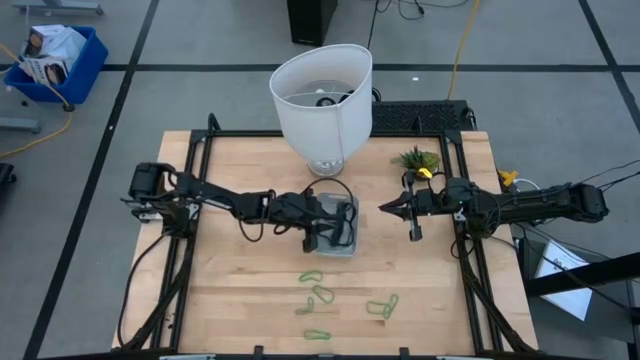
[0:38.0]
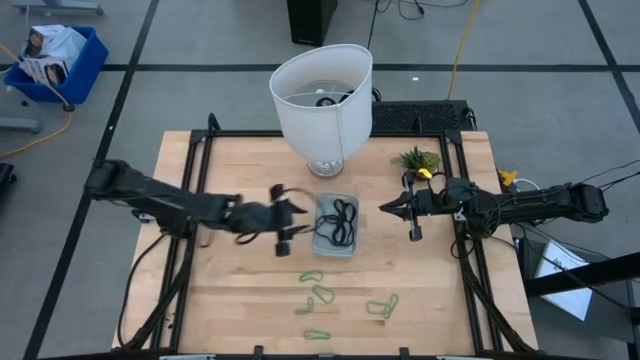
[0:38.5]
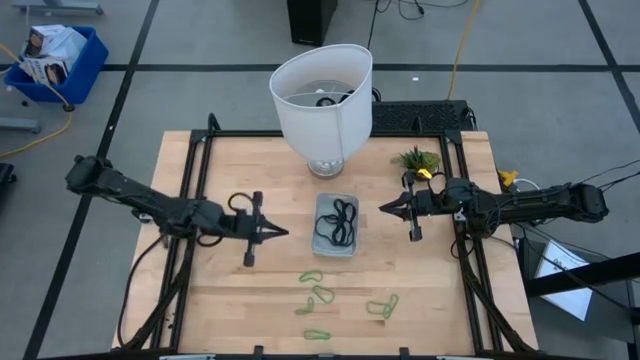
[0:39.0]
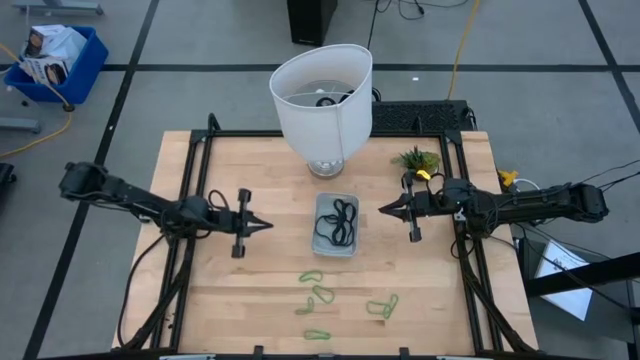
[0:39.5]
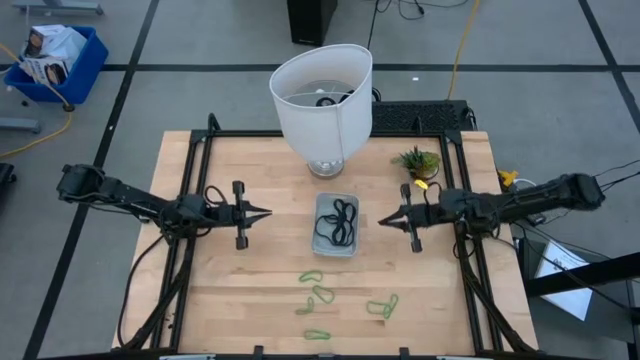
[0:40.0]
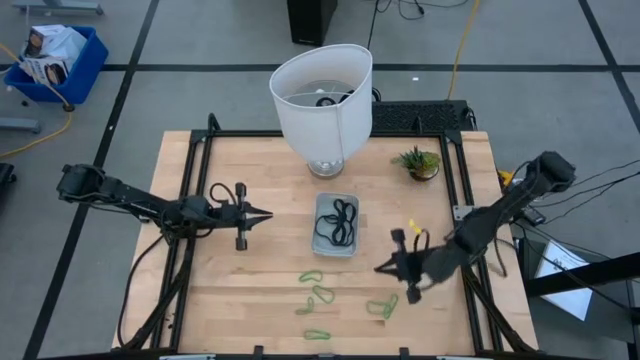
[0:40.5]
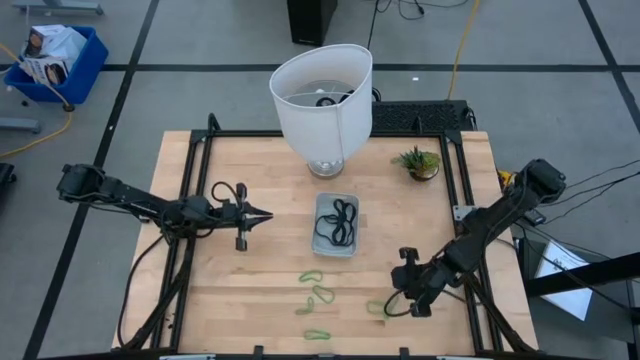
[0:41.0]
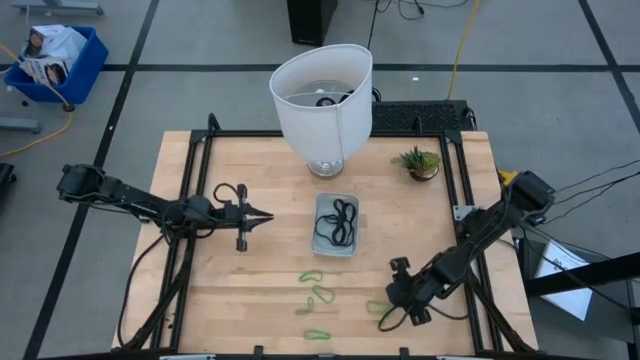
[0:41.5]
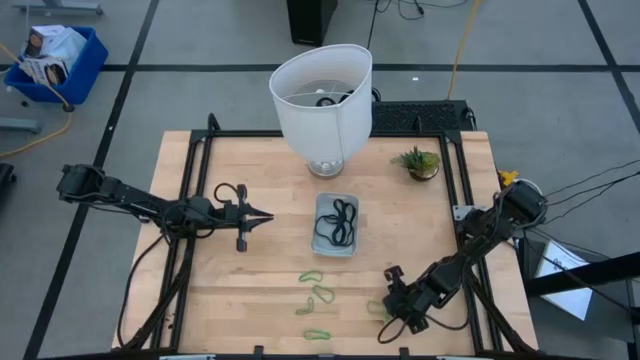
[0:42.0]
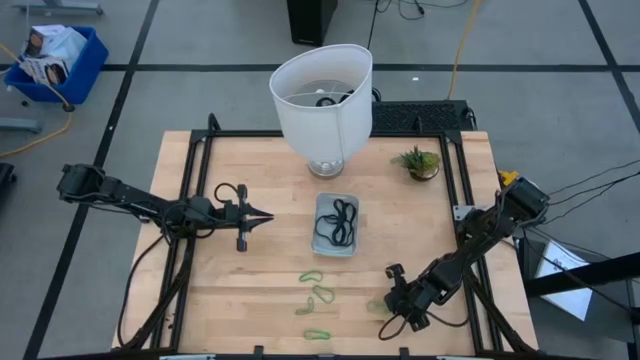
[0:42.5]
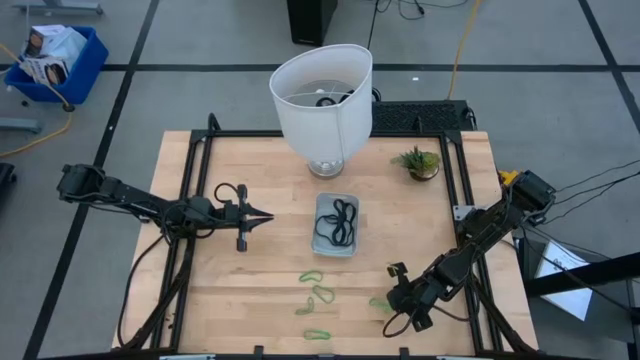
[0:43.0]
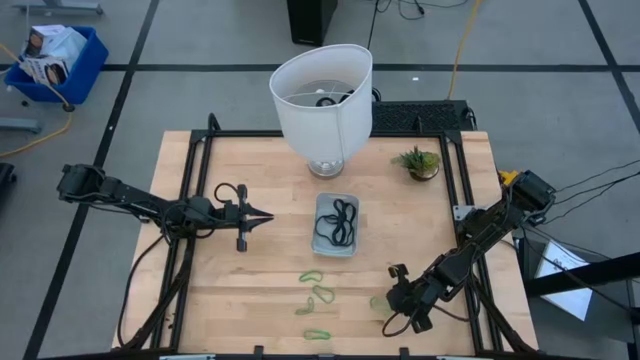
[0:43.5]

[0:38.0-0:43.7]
Task: Pick and place rubber bands into bin
Put the green rubber band into the gray bin

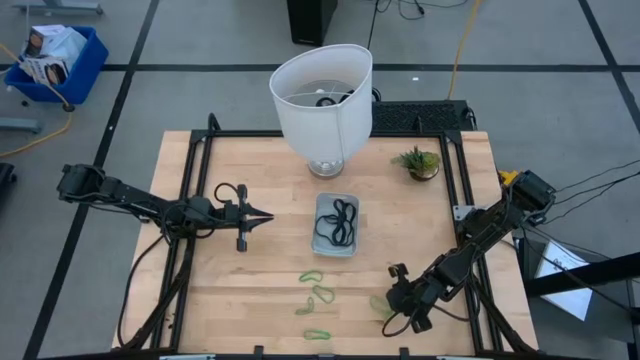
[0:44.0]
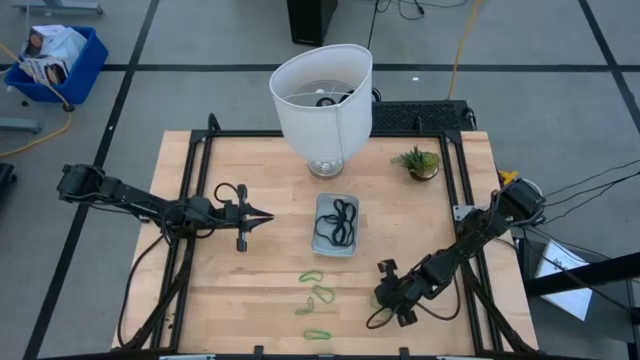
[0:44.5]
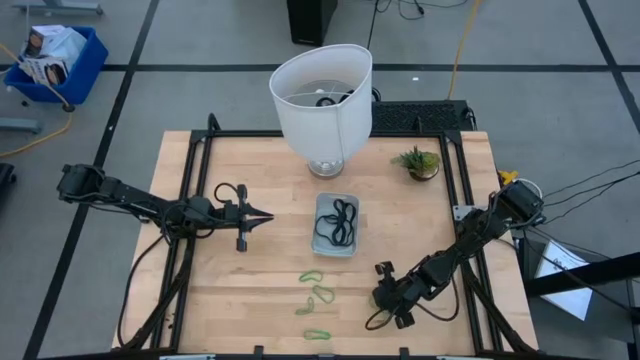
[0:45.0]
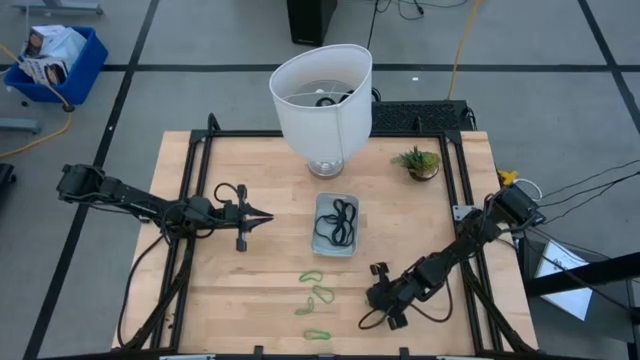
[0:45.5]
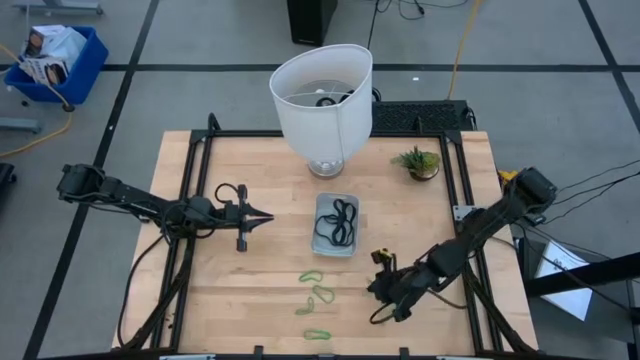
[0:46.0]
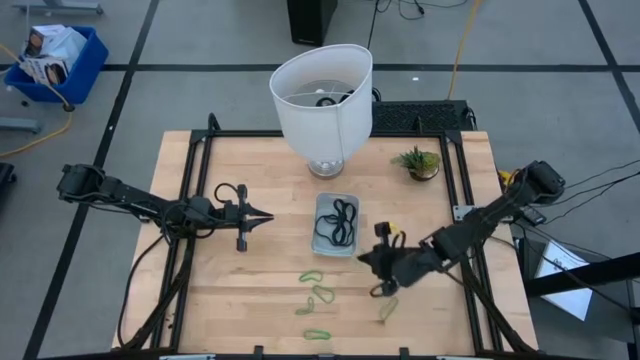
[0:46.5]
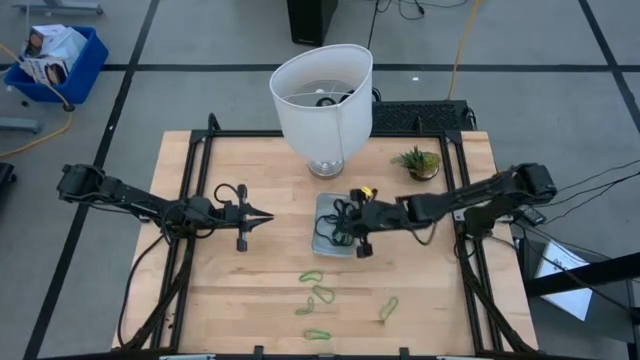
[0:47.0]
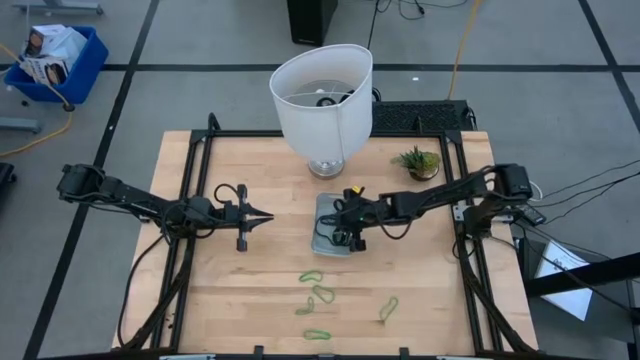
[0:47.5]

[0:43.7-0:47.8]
Put the green rubber band into the gray bin

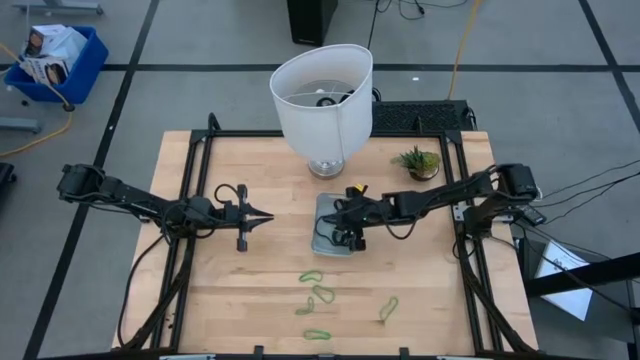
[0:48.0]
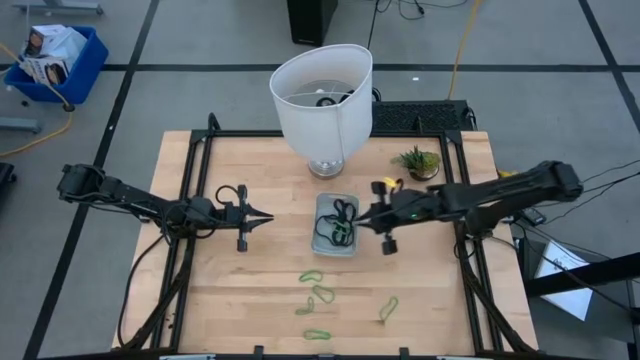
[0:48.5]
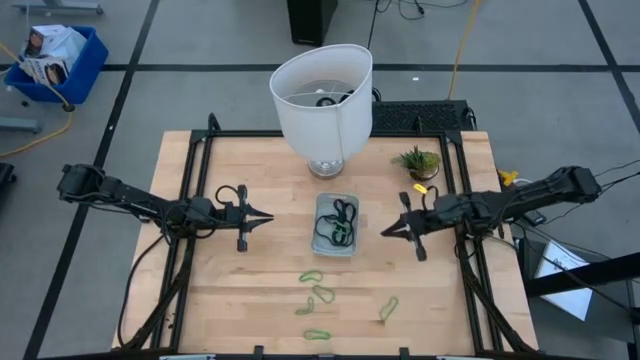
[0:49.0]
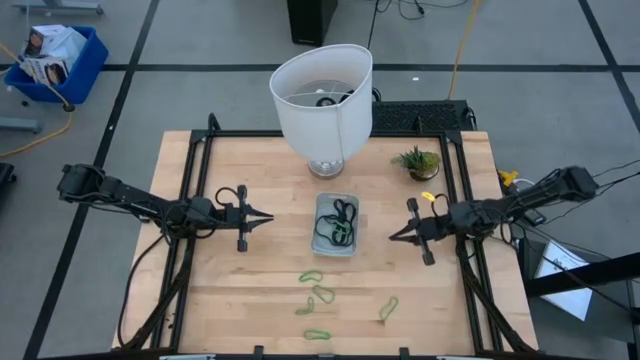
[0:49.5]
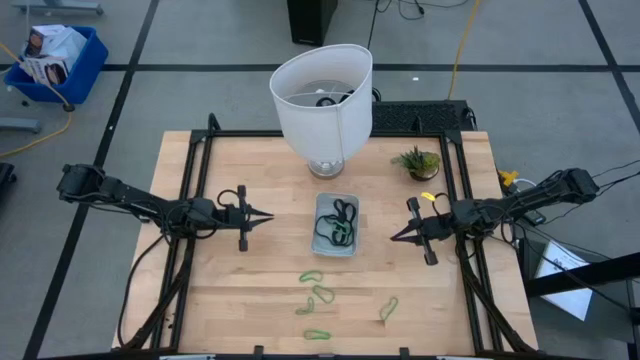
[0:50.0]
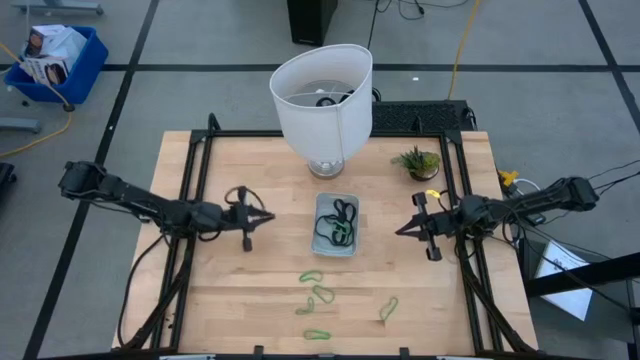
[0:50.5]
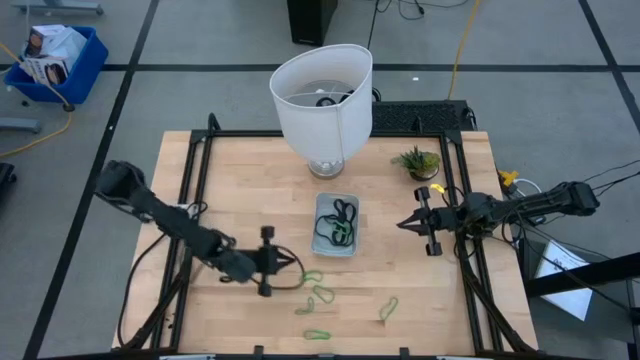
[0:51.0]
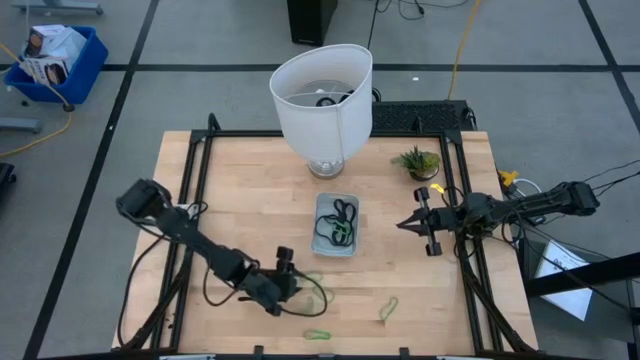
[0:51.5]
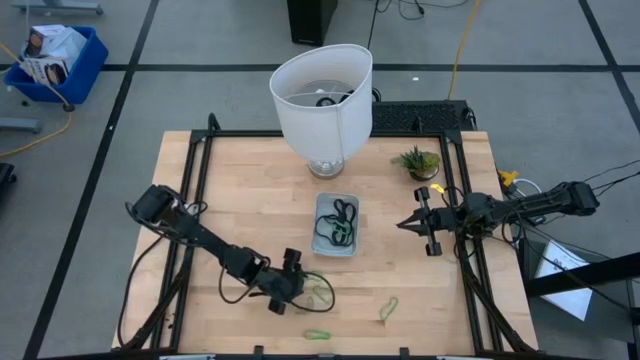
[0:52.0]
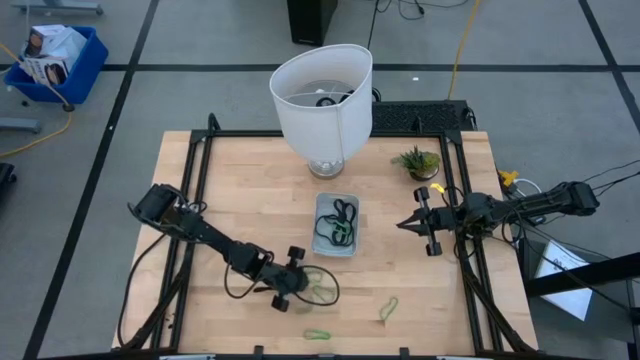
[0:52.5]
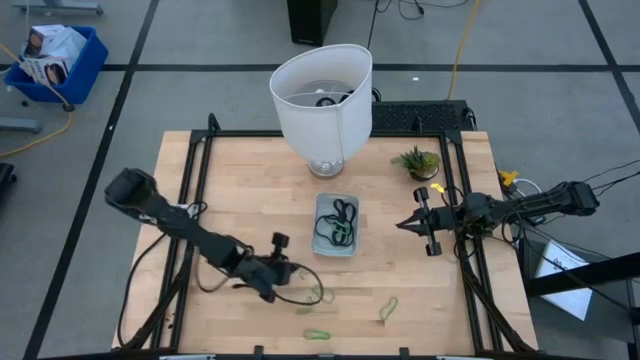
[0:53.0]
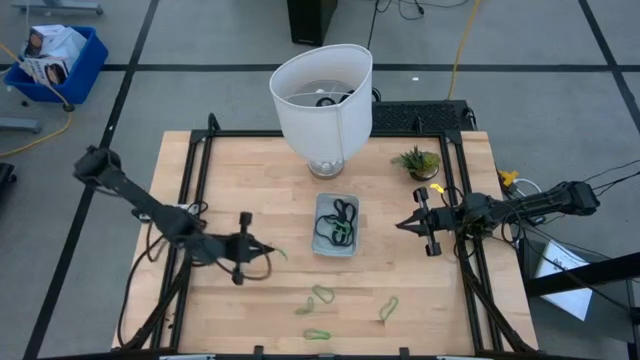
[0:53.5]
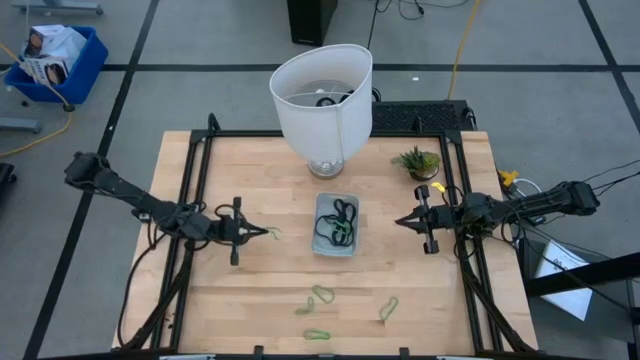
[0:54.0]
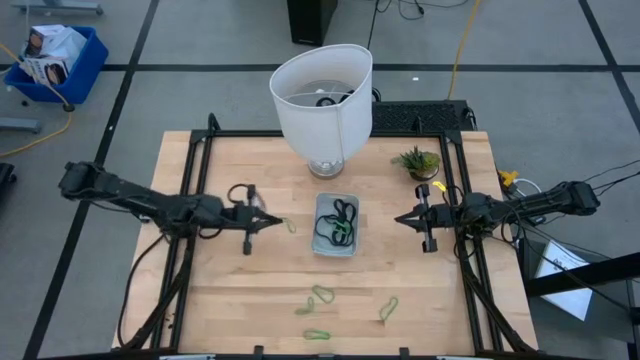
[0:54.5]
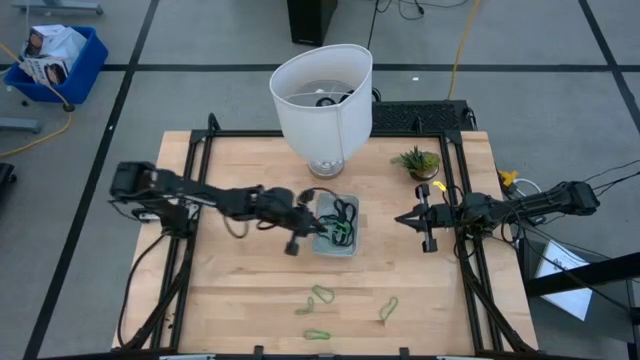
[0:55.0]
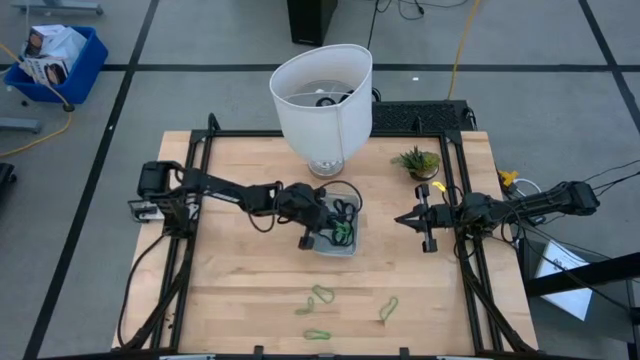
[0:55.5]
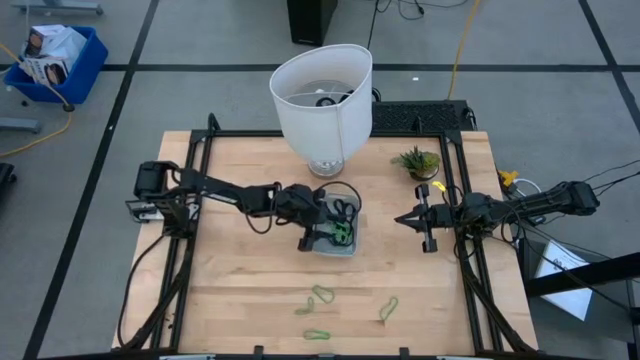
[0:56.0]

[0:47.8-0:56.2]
Put the green rubber band into the gray bin

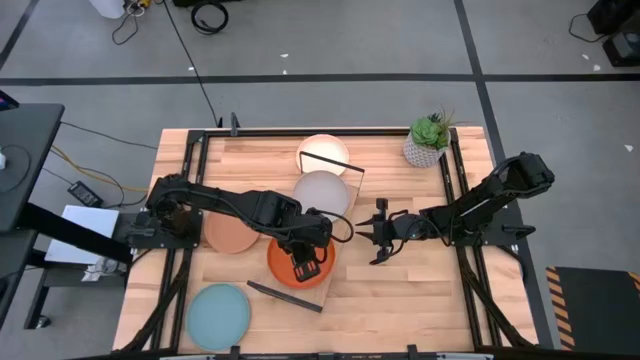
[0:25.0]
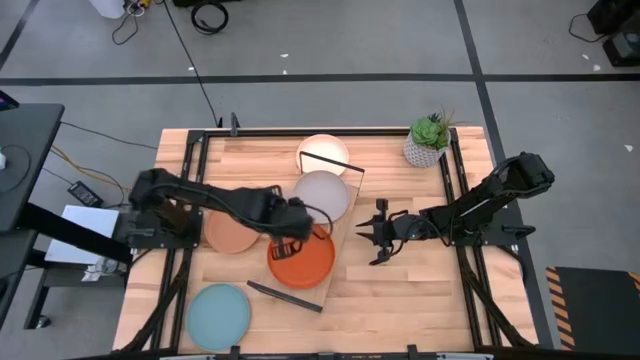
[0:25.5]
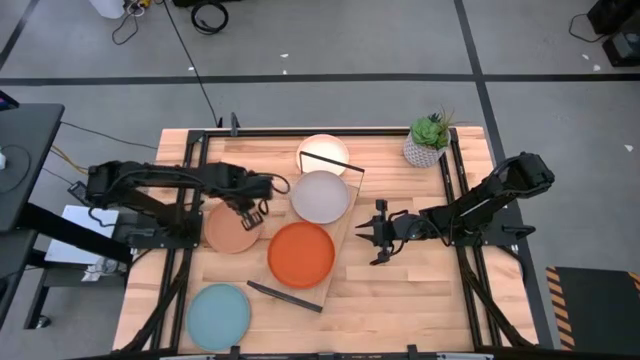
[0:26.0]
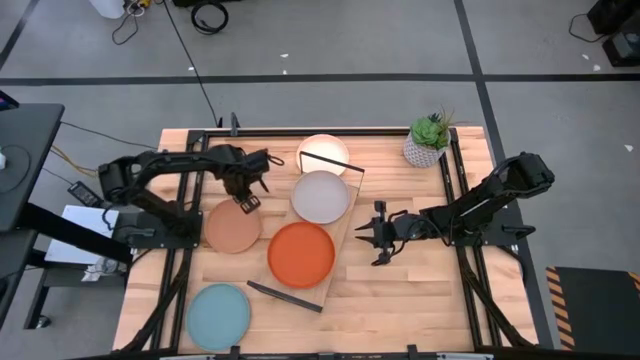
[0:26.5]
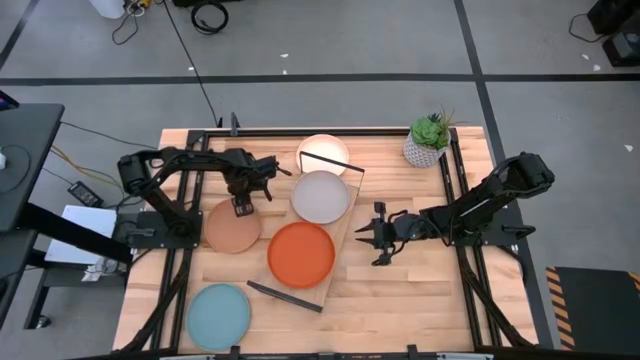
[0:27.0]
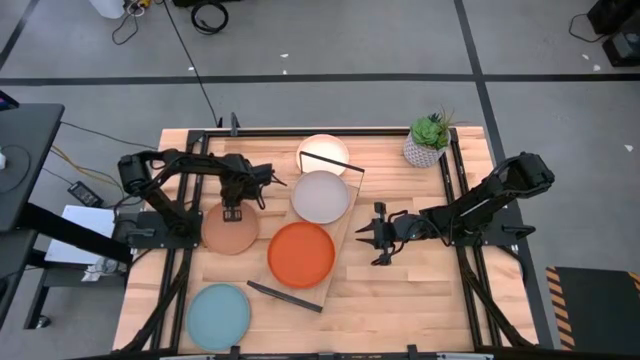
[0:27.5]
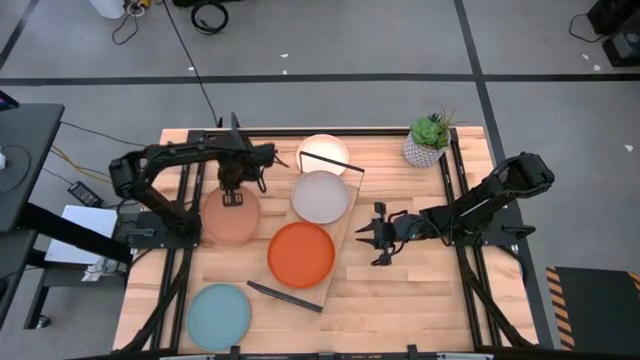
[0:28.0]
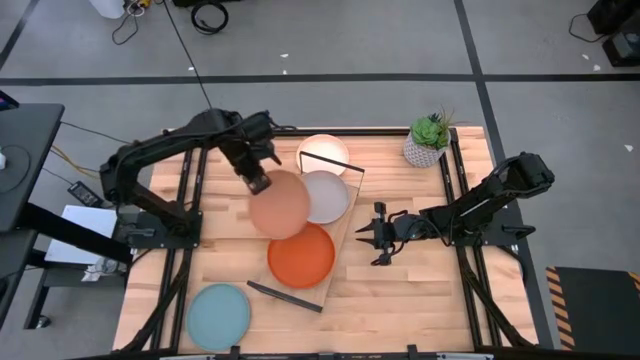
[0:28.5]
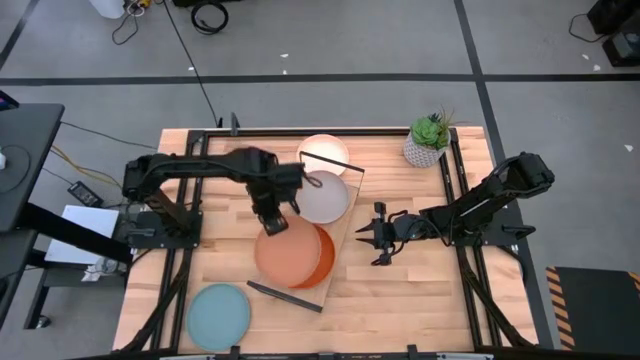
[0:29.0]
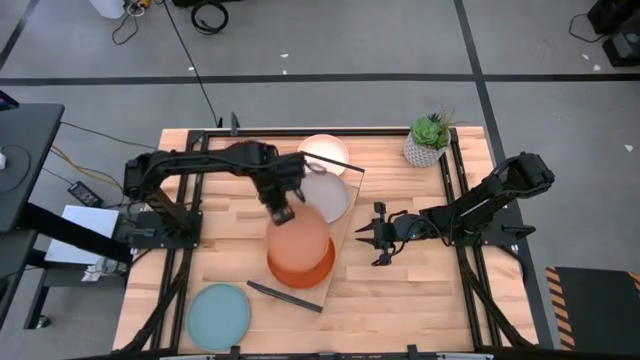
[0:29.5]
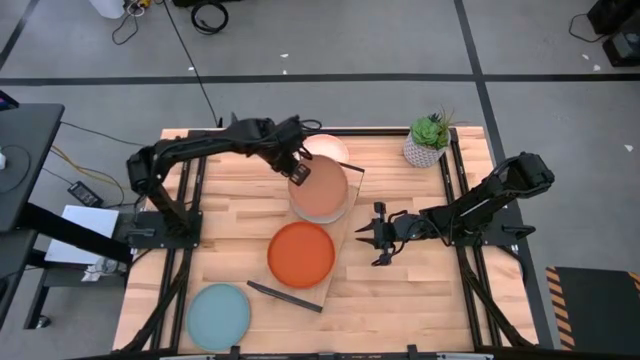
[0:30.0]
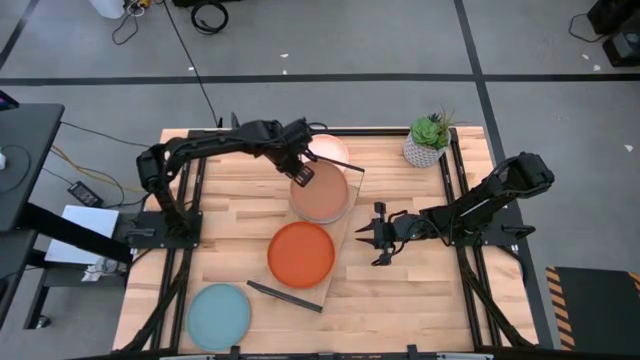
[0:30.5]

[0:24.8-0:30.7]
Task: Place and stack plates onto a shelf
Stack the brown plate on top of the gray plate on the shelf
